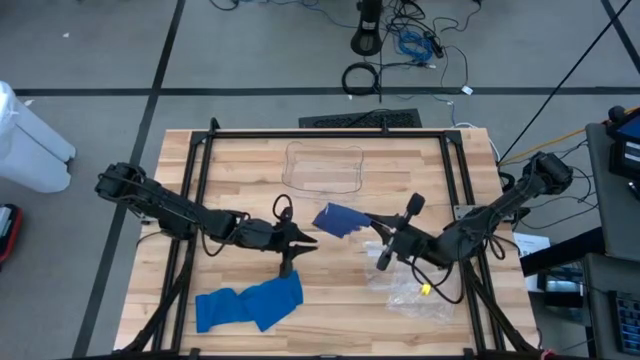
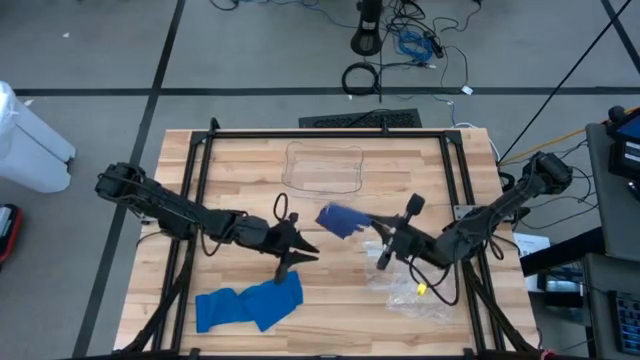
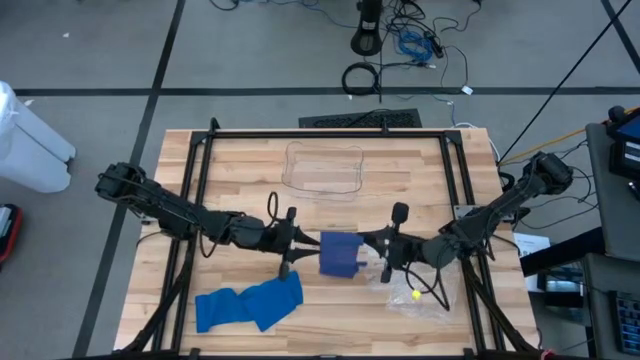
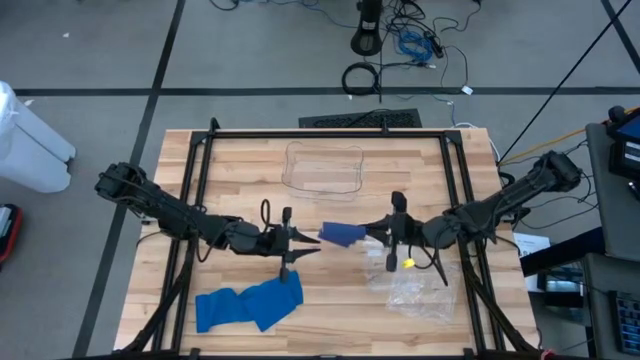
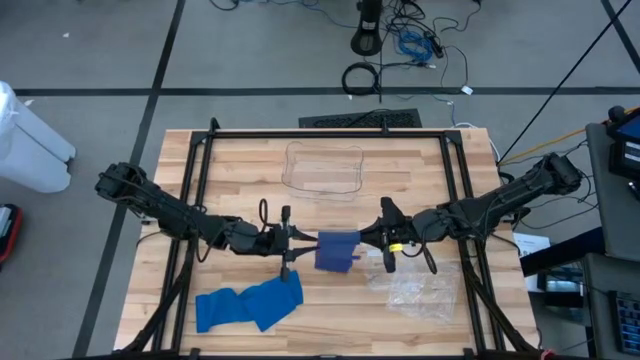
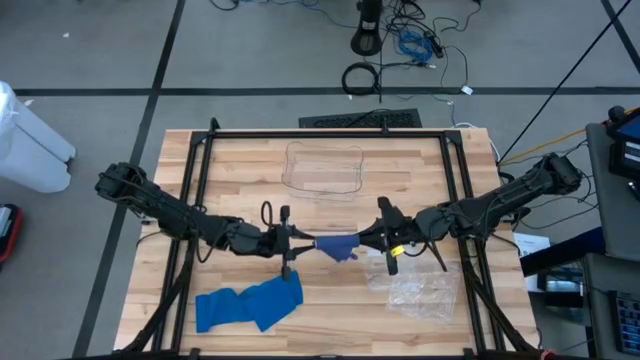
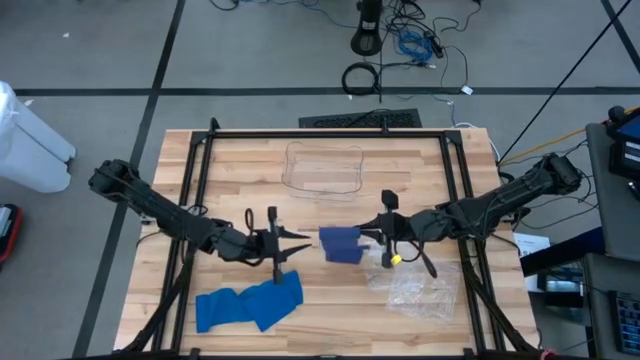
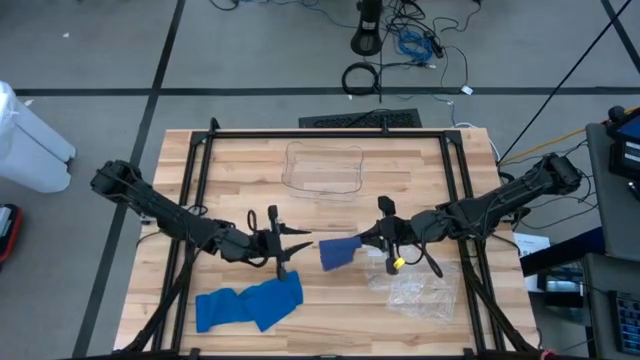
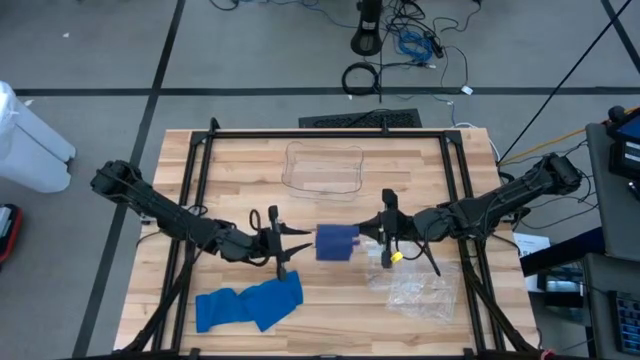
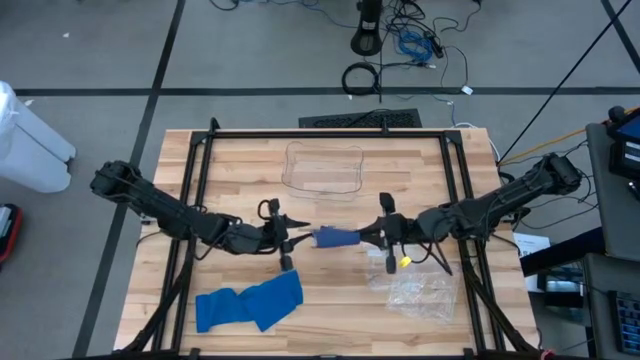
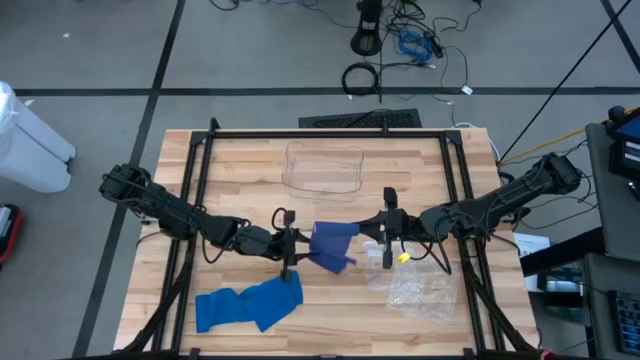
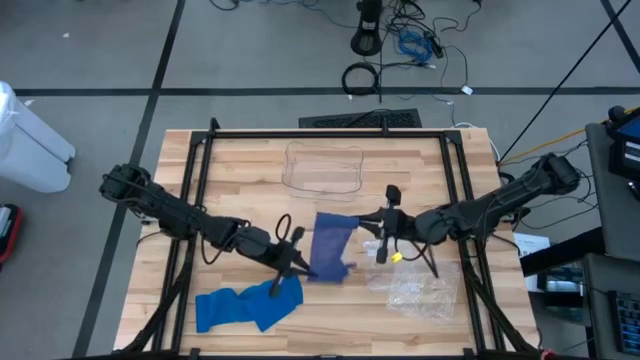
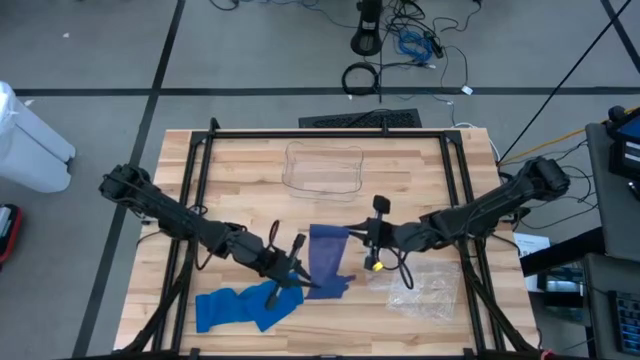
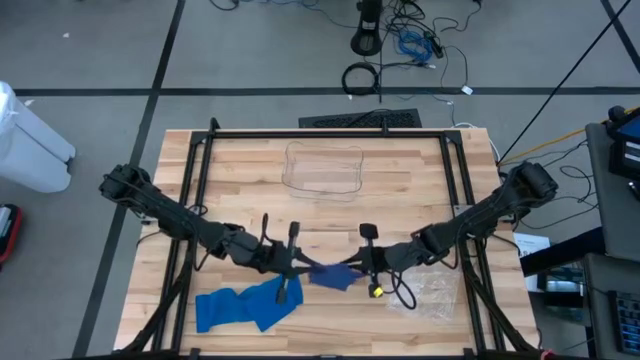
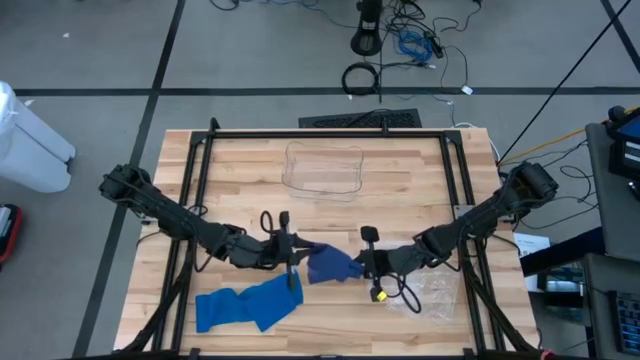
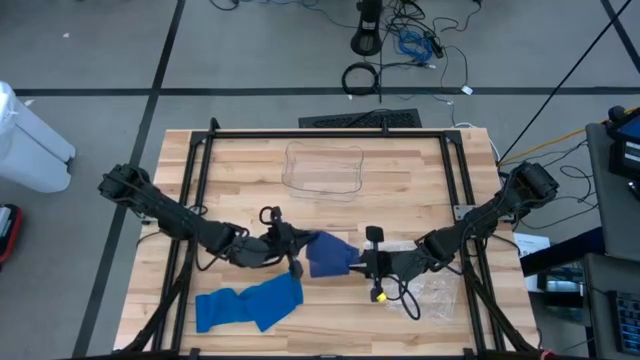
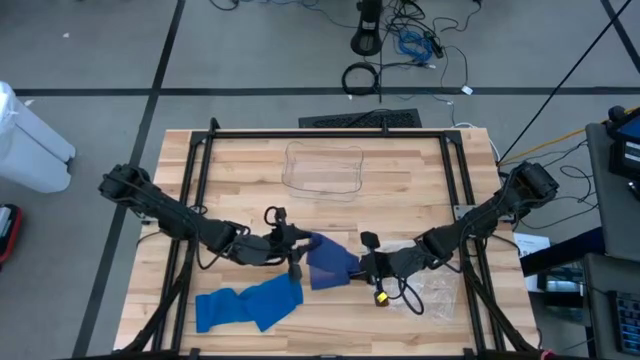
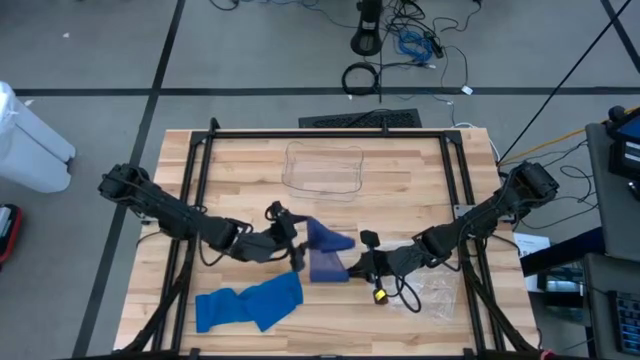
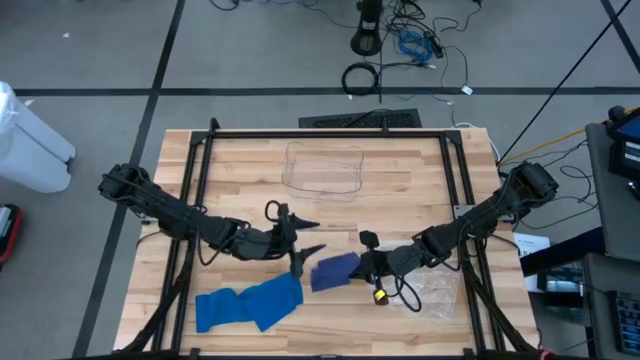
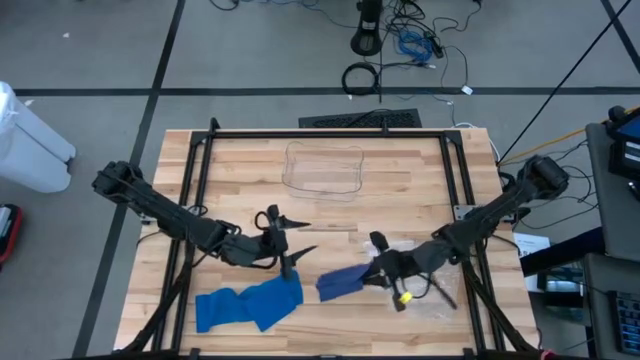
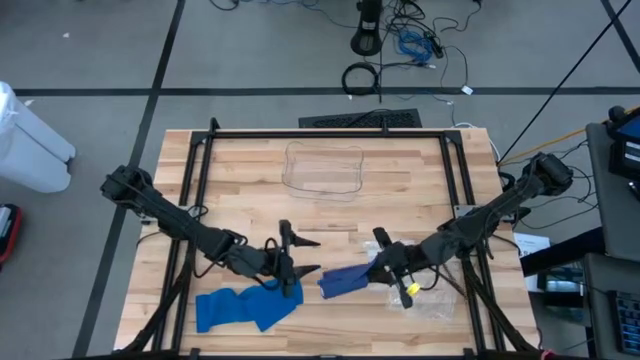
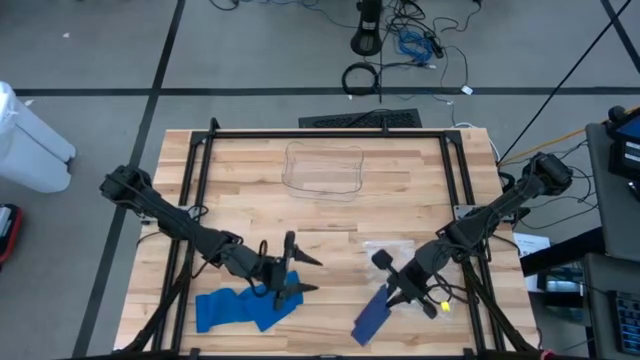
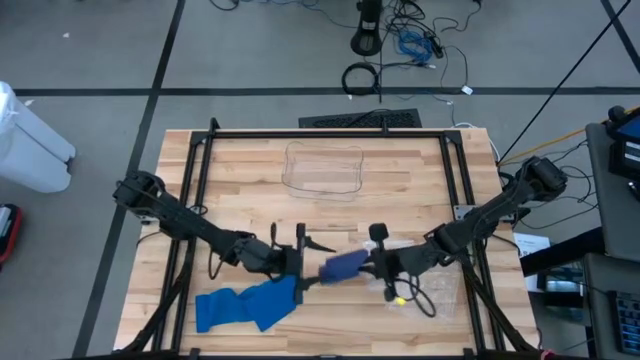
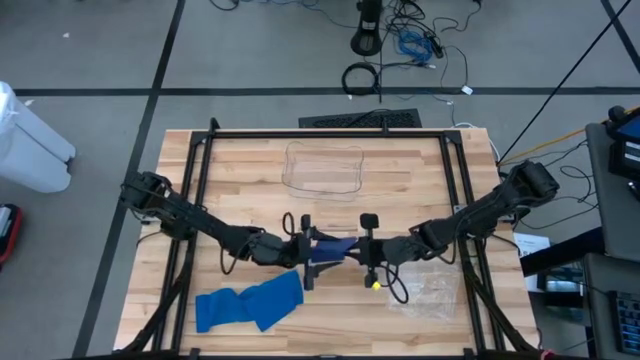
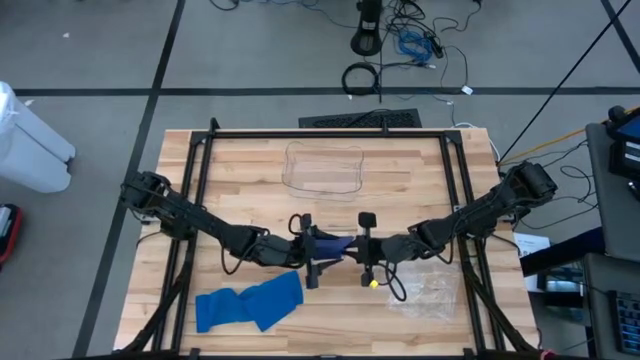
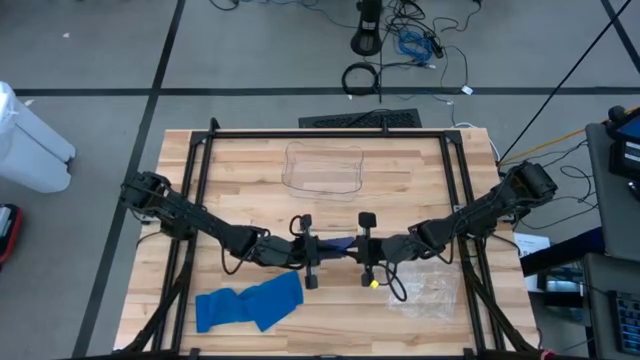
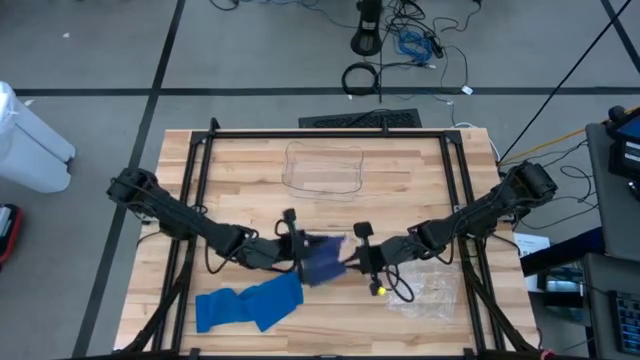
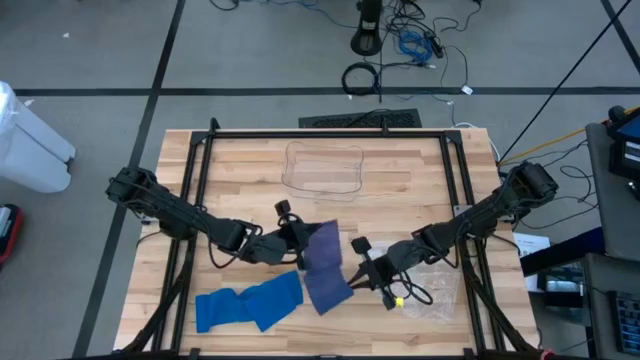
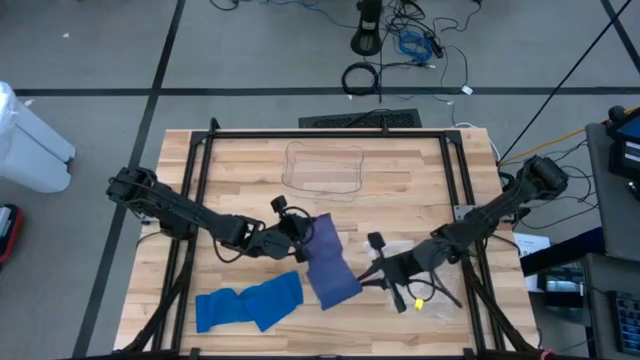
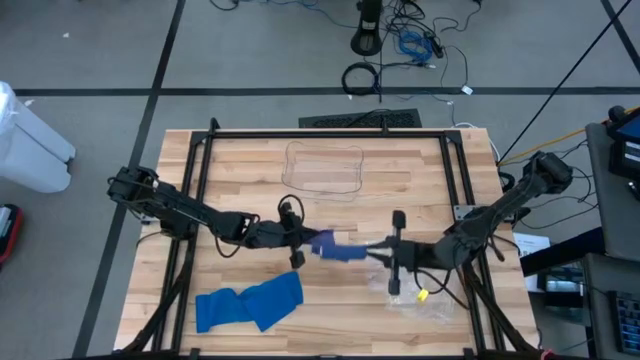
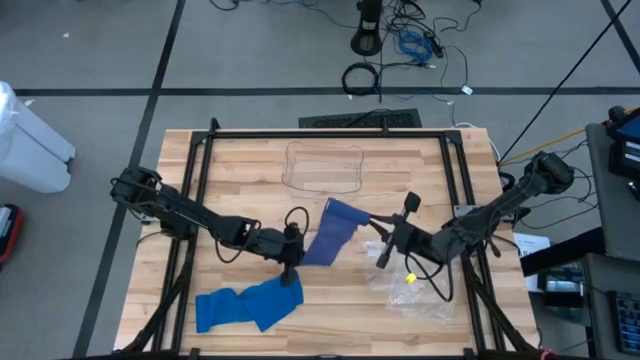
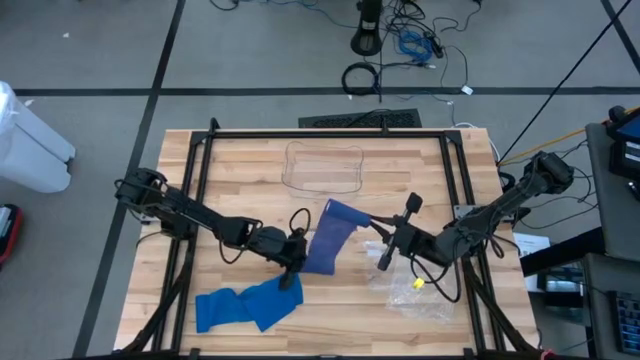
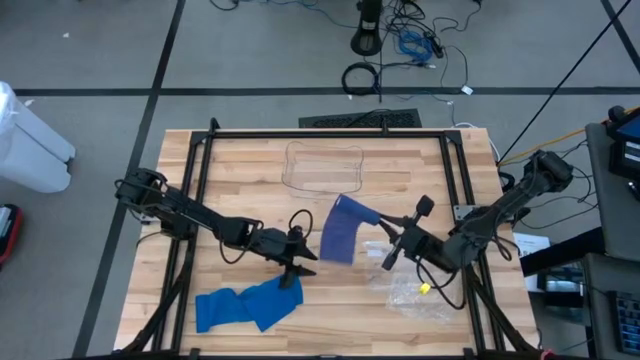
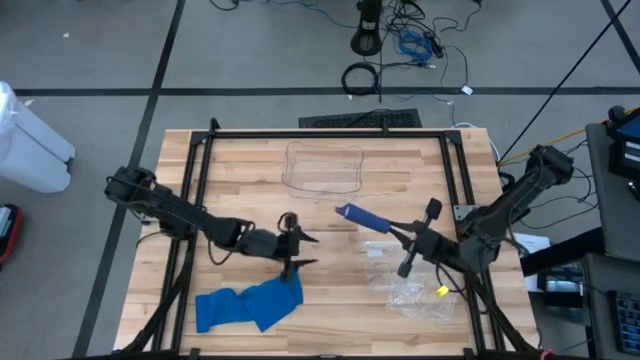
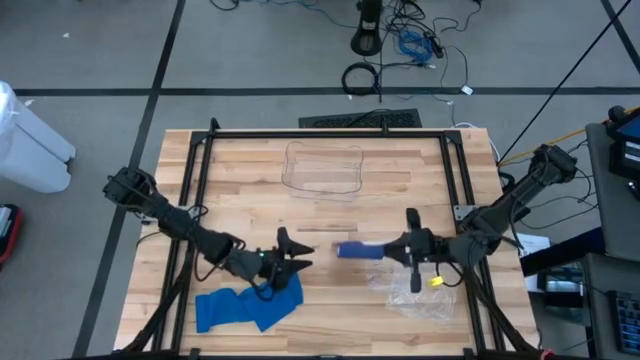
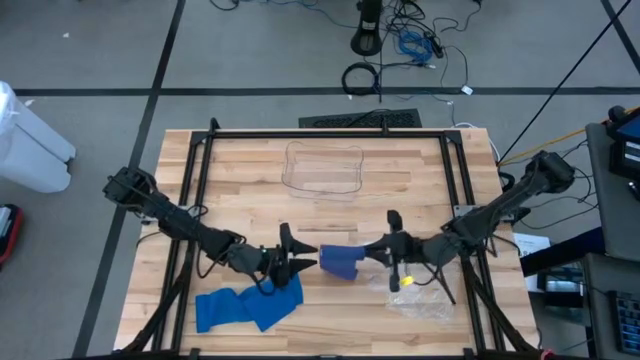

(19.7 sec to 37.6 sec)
Task: Roll bandage
Roll the purple bandage
